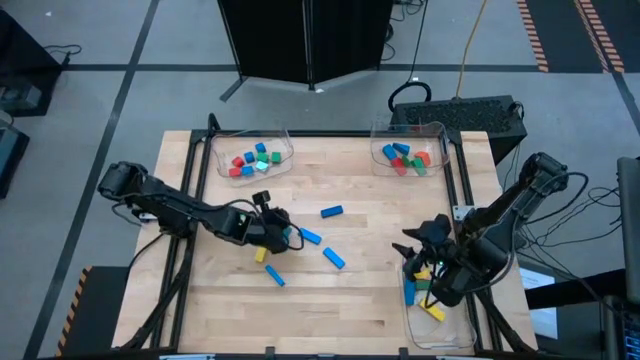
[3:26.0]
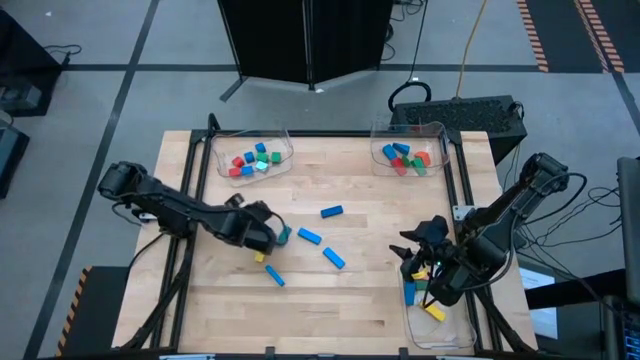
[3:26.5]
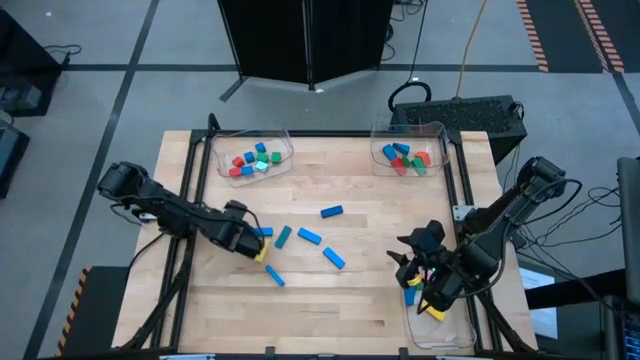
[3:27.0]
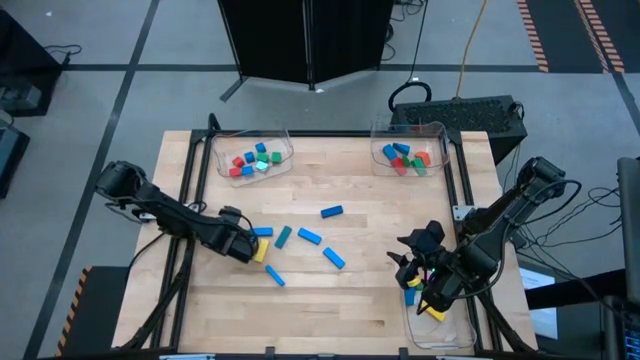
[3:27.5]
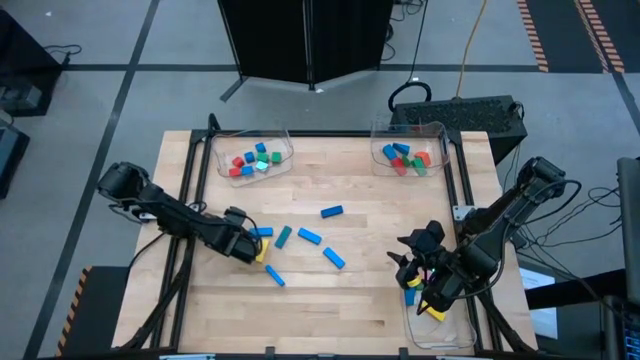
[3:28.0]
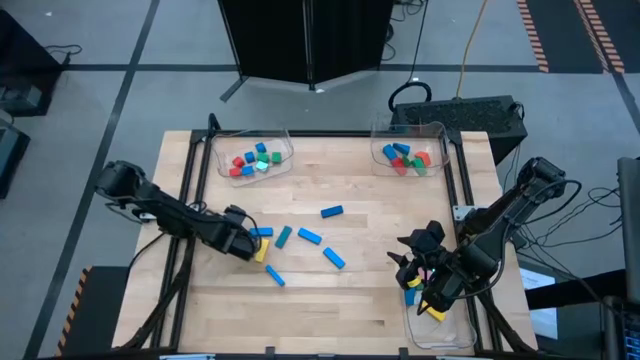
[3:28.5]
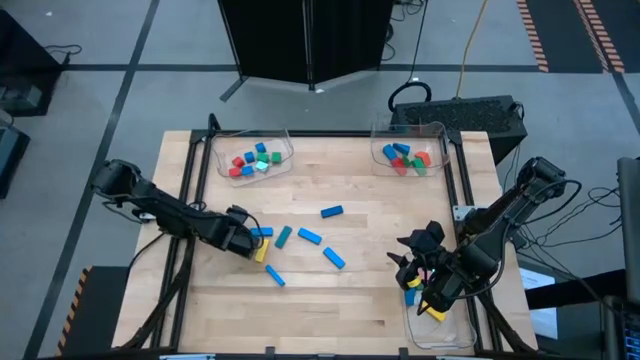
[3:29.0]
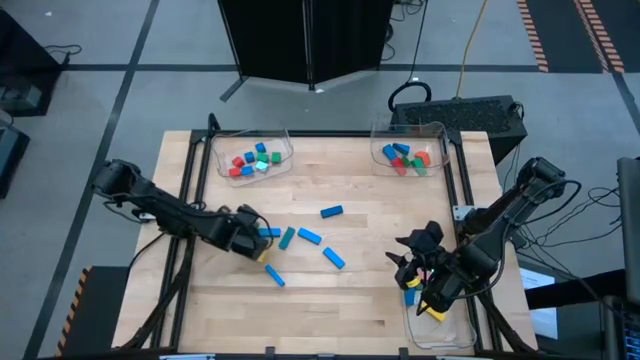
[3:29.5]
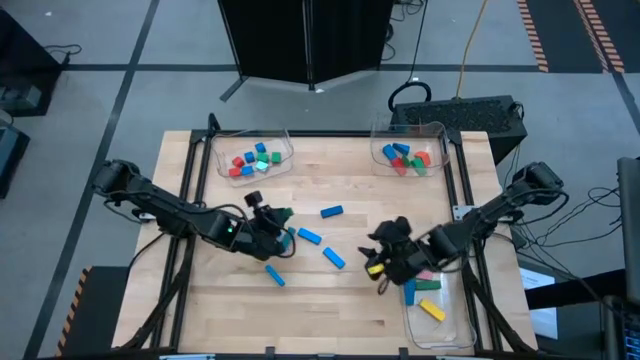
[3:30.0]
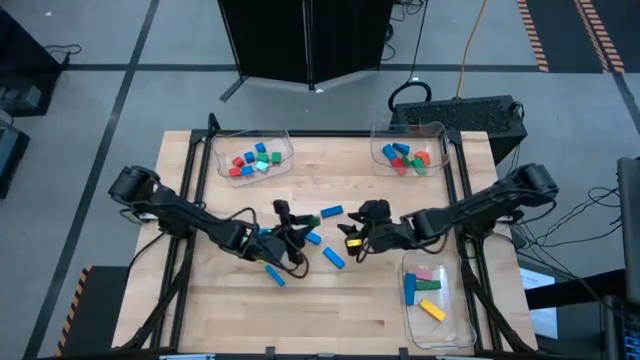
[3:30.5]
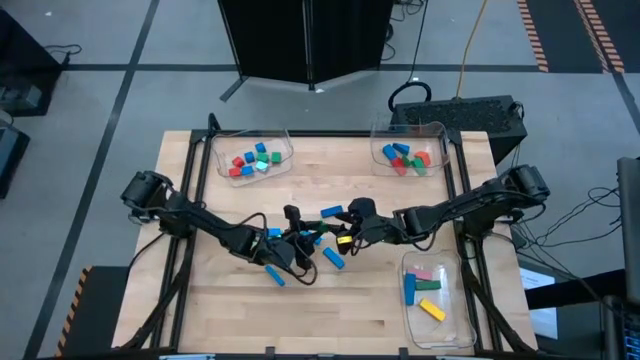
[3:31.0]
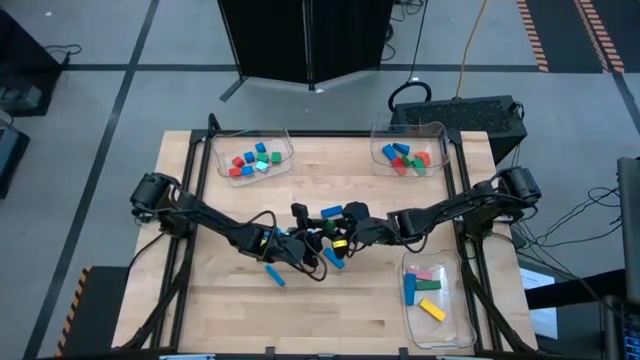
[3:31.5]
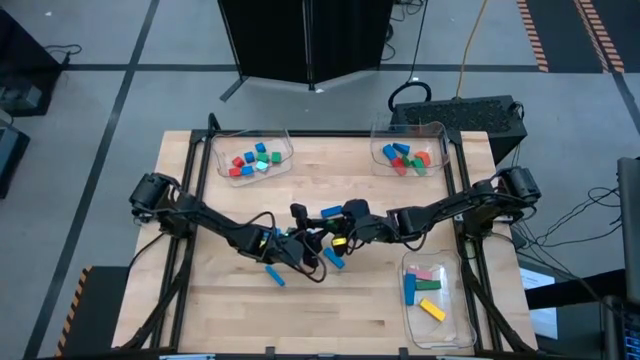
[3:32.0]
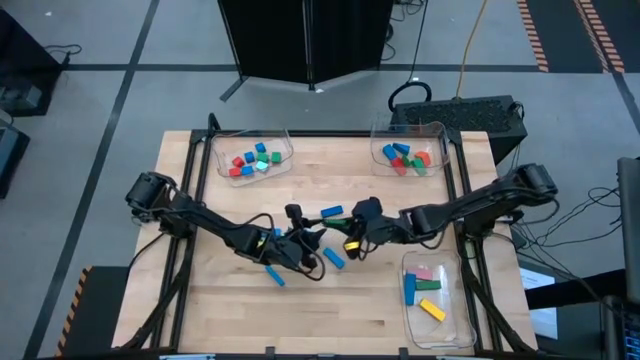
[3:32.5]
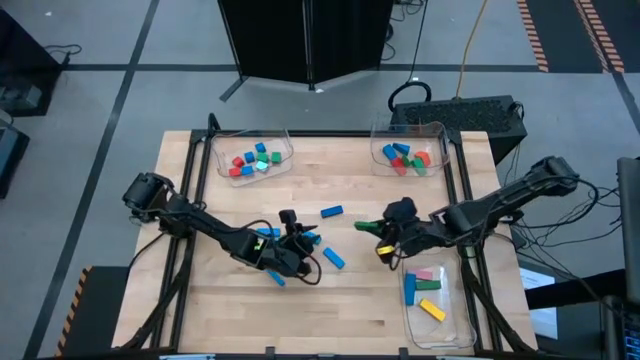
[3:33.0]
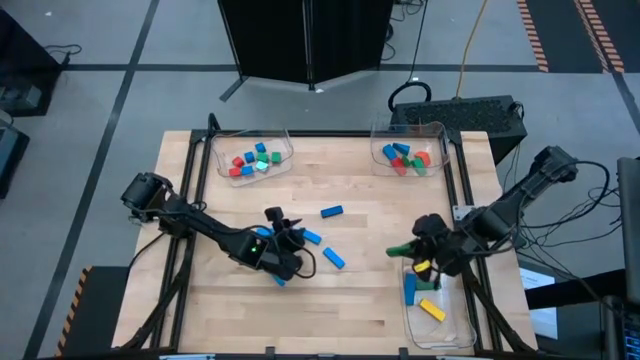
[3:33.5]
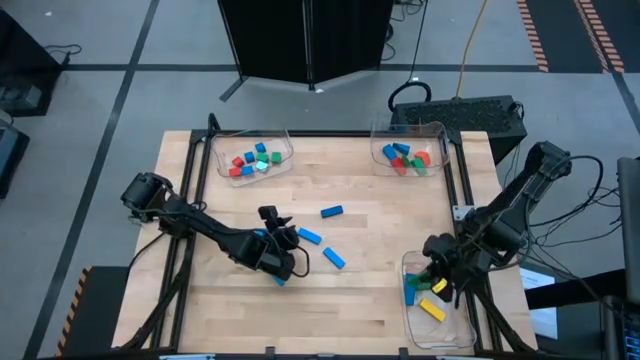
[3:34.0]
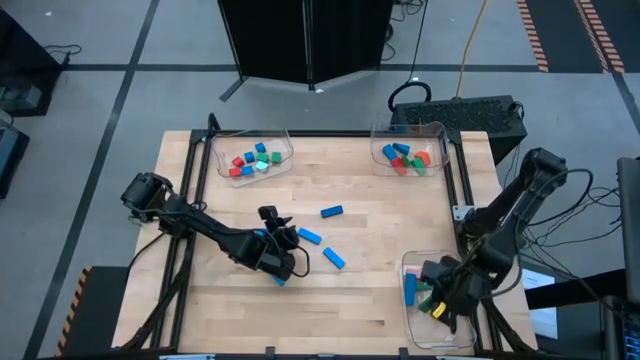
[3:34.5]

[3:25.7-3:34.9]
Task: Sort blocks by size
Put the green rectangular block into the bottom right transparent bin

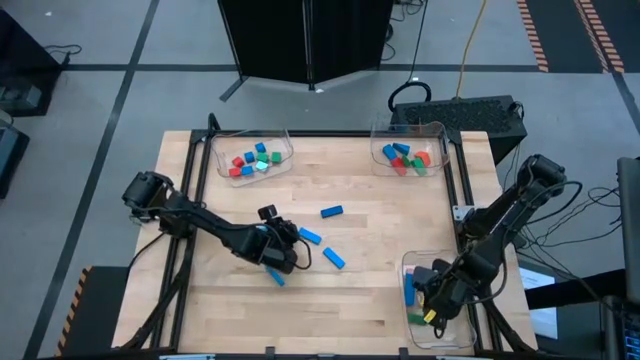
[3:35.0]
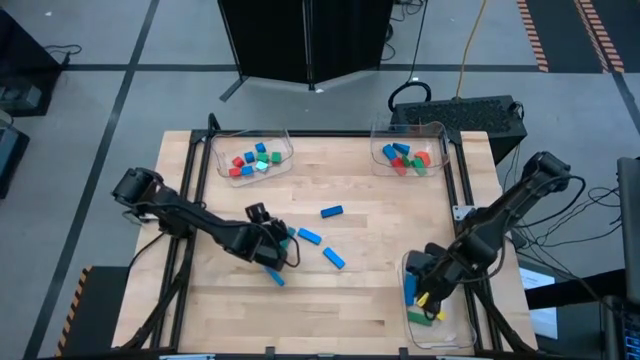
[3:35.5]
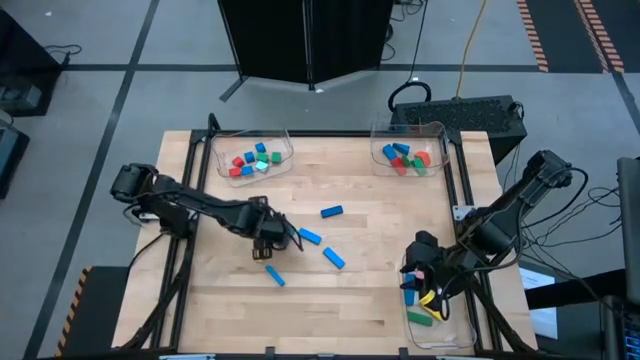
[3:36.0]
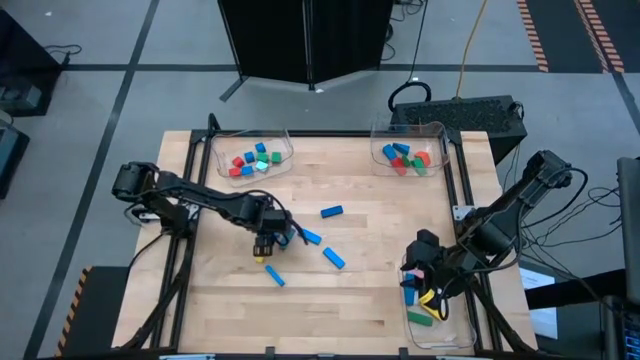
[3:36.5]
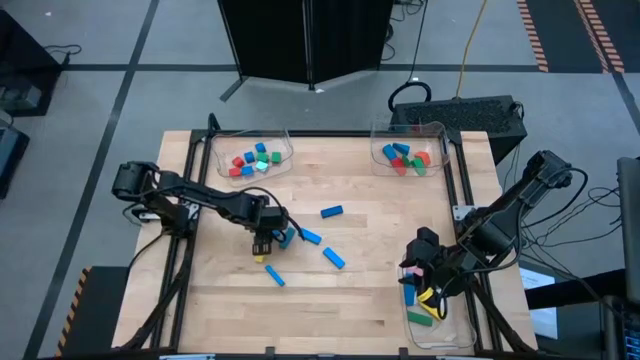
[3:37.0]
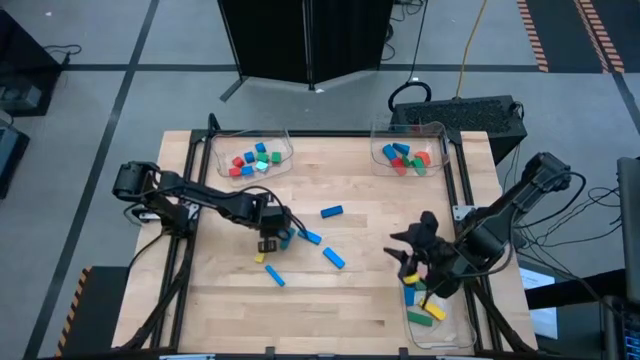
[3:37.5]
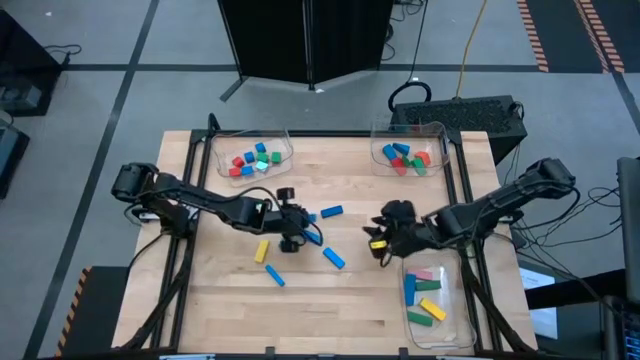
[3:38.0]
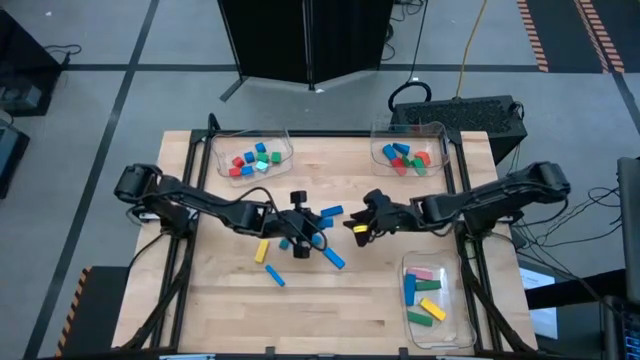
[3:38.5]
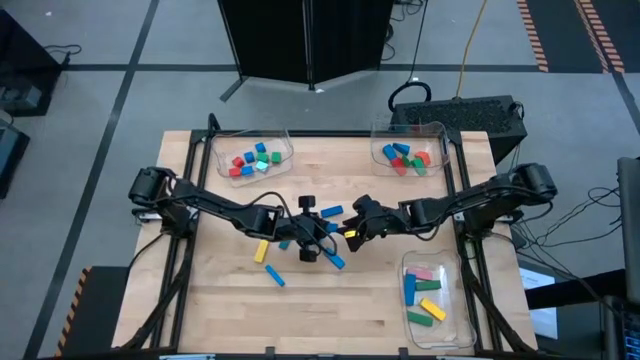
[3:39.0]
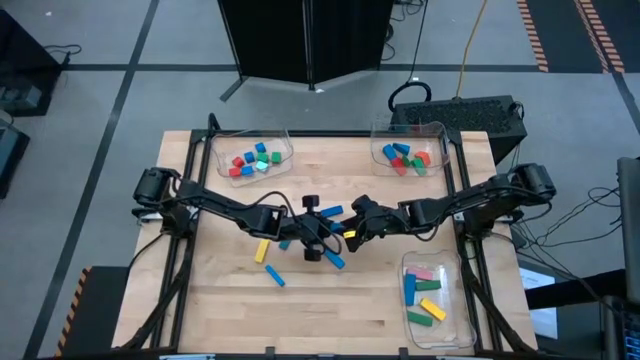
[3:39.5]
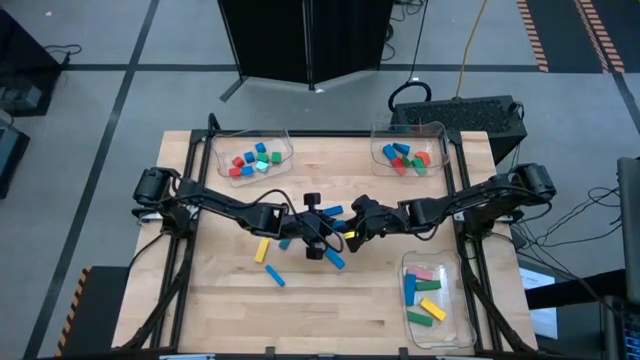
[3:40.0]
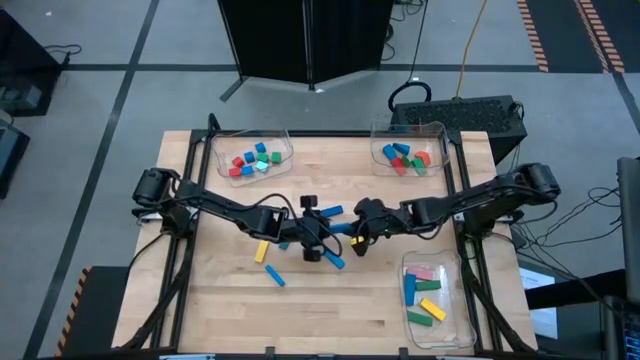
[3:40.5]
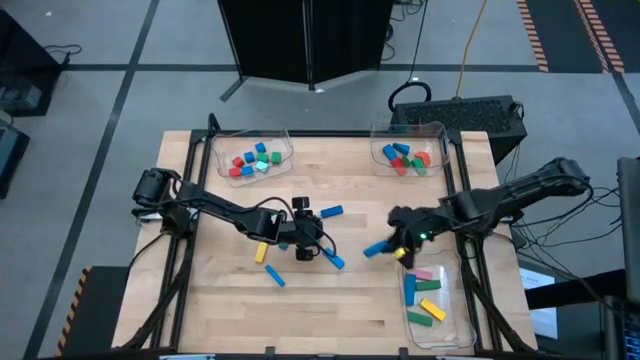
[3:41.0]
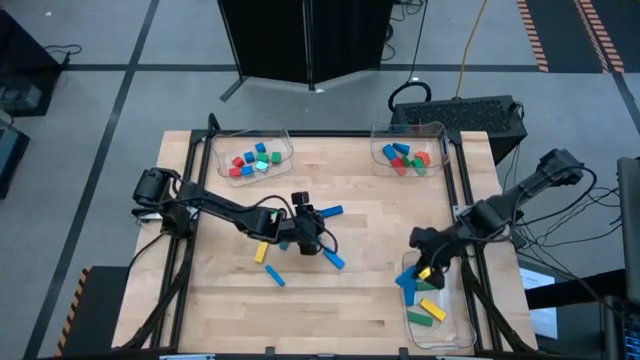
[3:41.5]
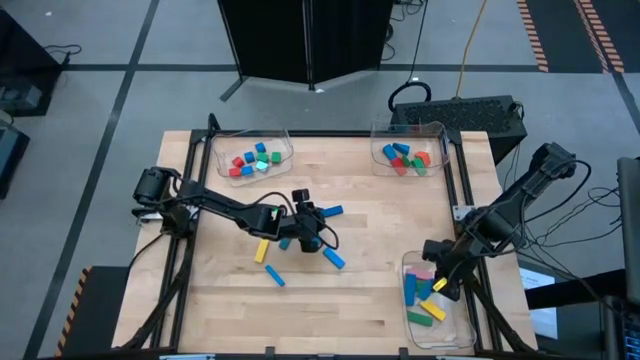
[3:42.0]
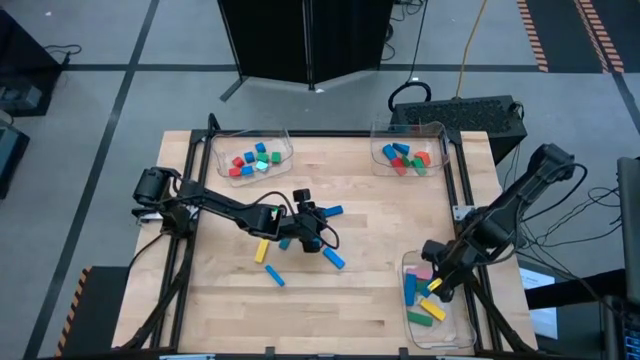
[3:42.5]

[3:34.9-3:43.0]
Put the blue rectangular block into the bottom right transparent bin

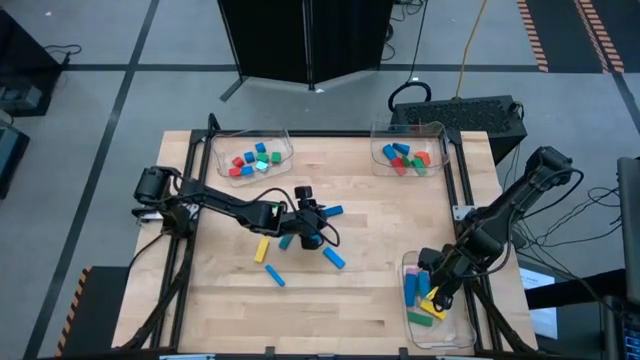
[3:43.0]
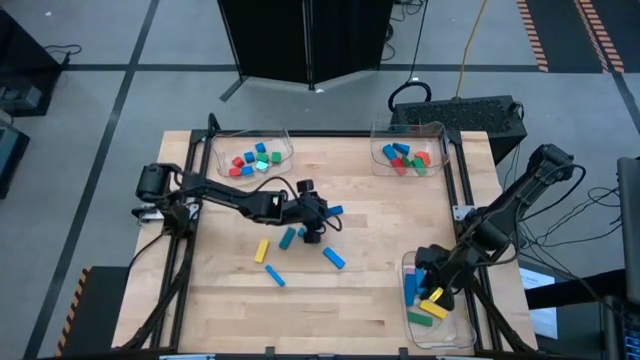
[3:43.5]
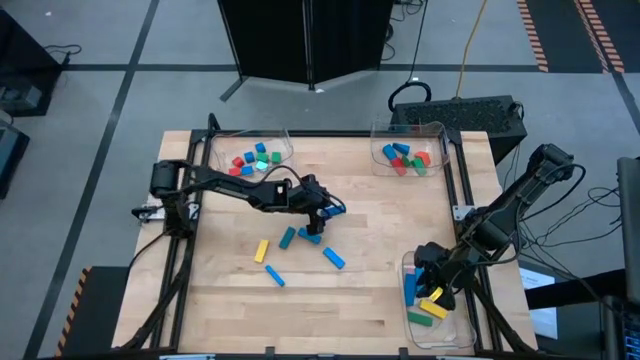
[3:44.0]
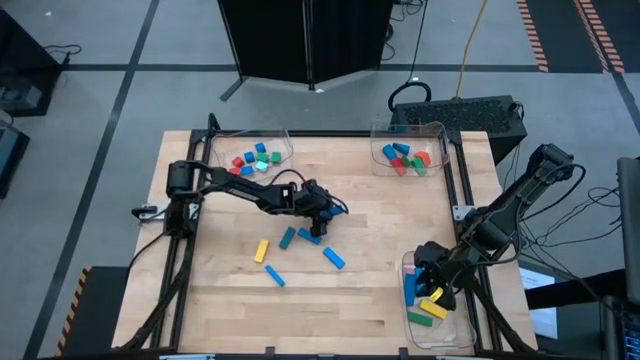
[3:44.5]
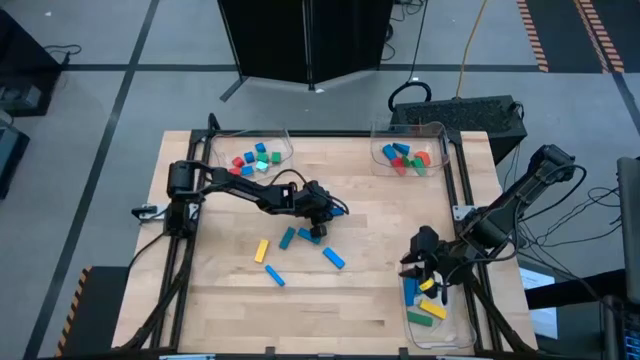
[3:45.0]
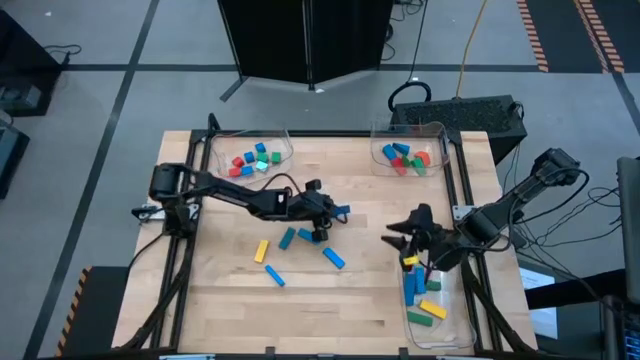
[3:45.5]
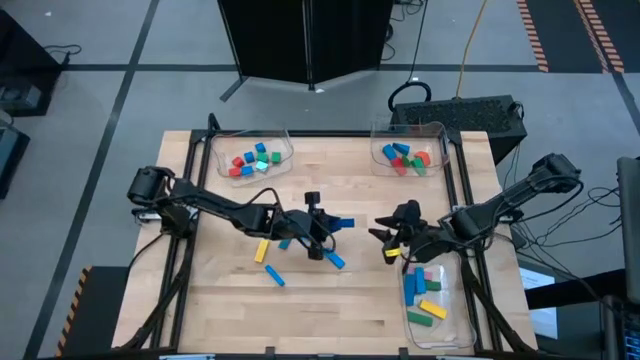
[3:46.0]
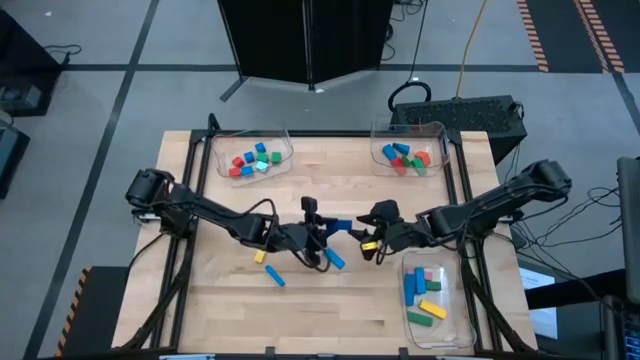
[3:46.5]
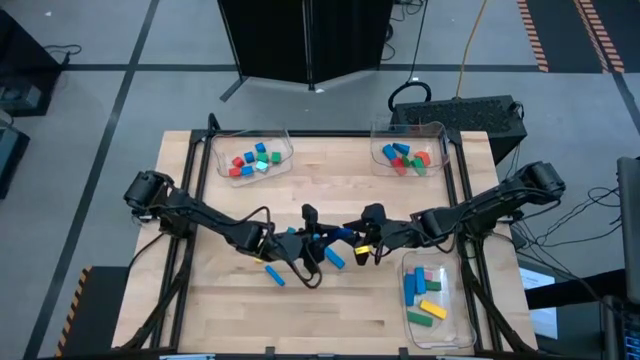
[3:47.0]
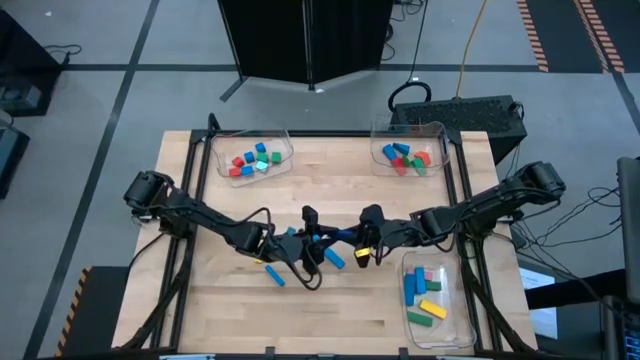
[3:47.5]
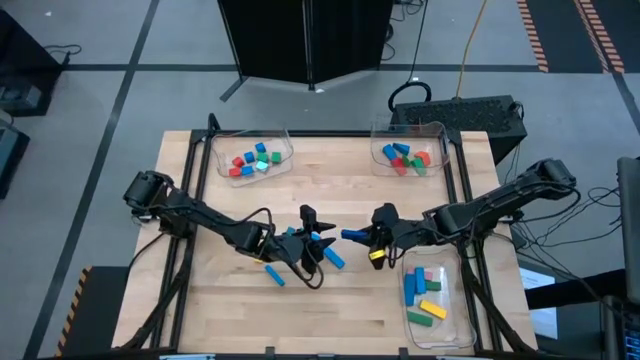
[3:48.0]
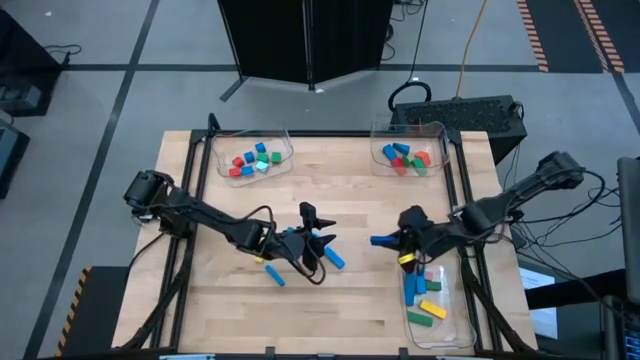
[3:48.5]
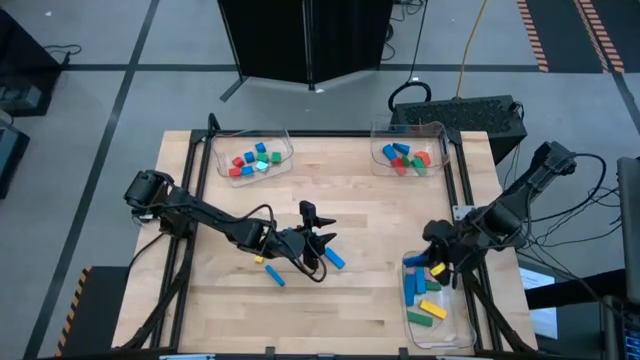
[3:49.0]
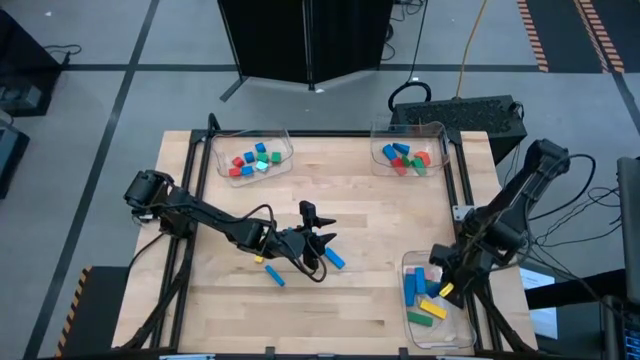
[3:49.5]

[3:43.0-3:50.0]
Put the blue rectangular block into the bottom right transparent bin
